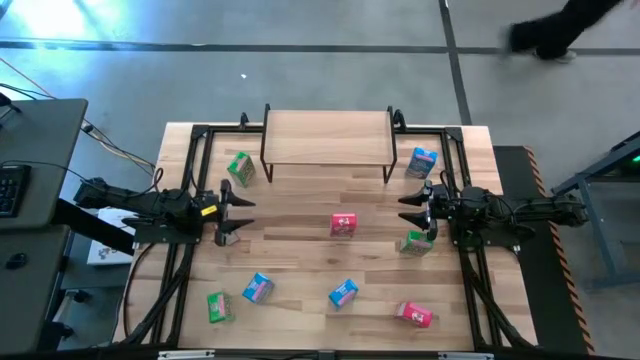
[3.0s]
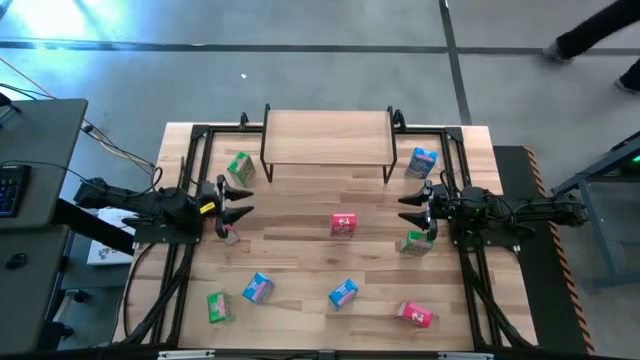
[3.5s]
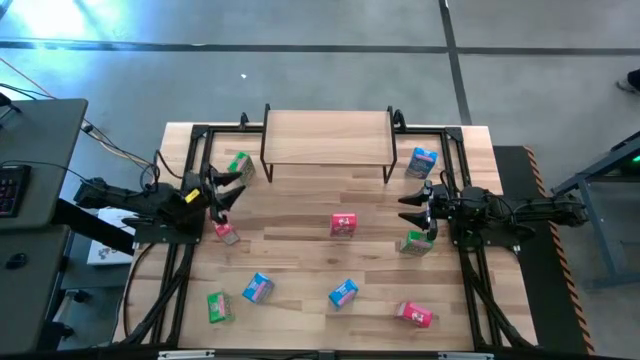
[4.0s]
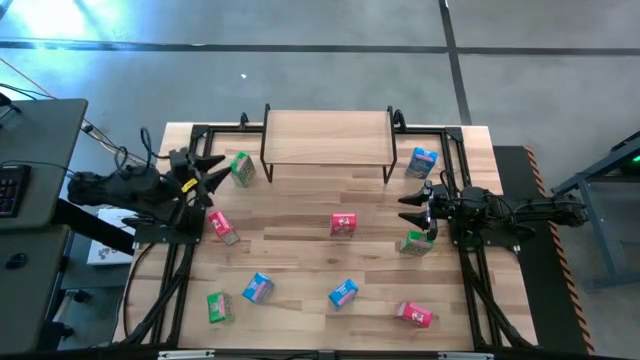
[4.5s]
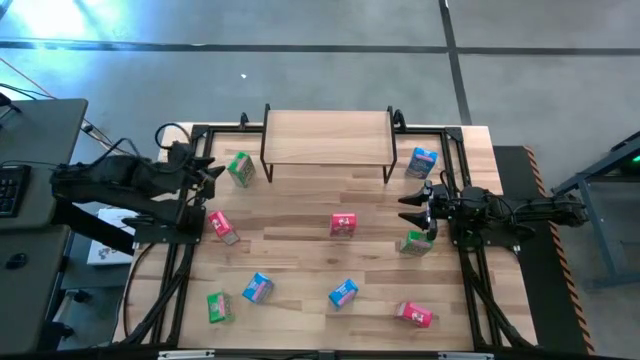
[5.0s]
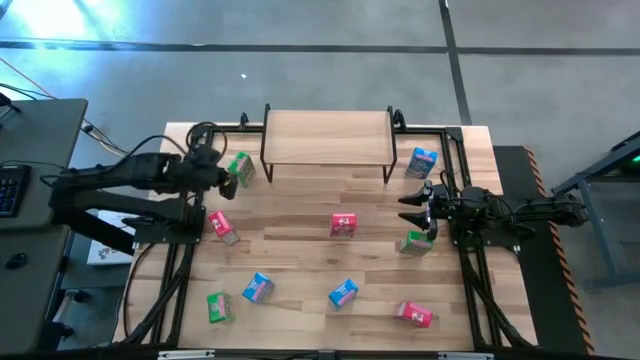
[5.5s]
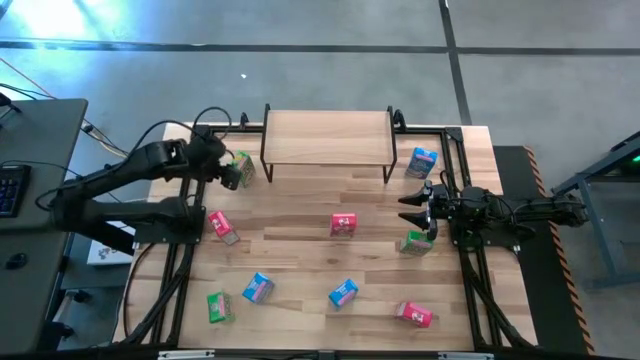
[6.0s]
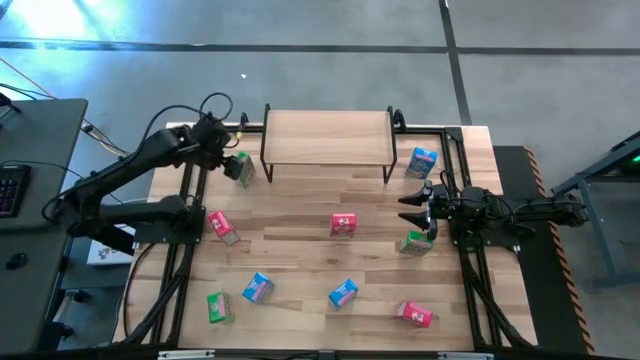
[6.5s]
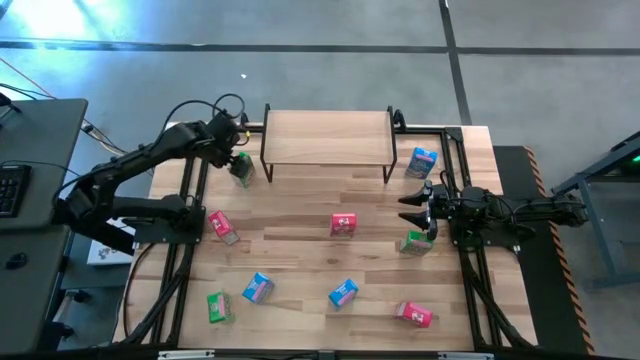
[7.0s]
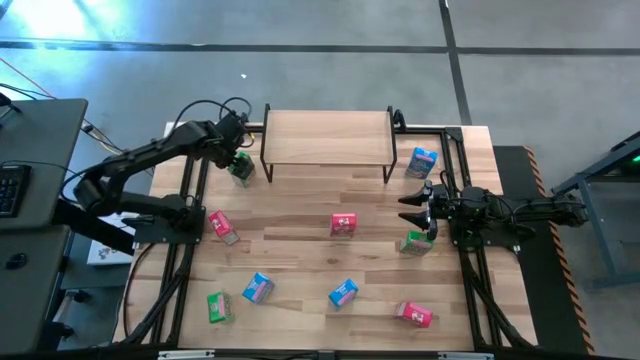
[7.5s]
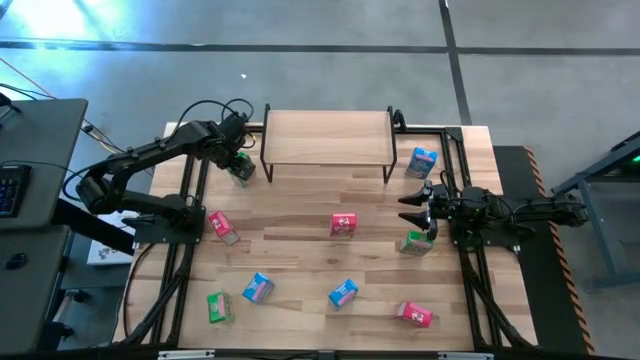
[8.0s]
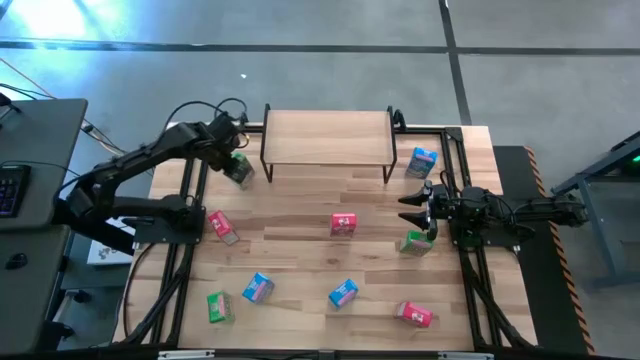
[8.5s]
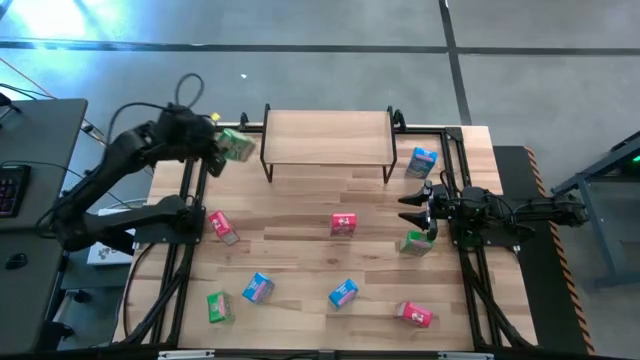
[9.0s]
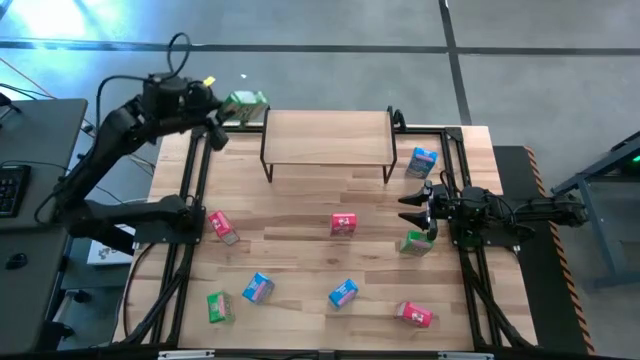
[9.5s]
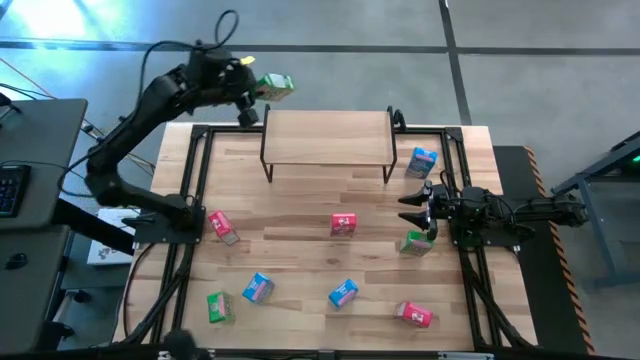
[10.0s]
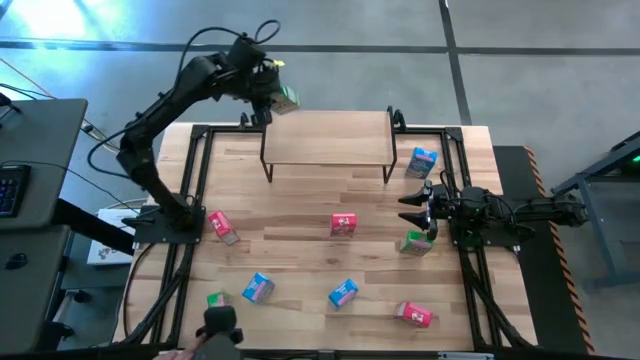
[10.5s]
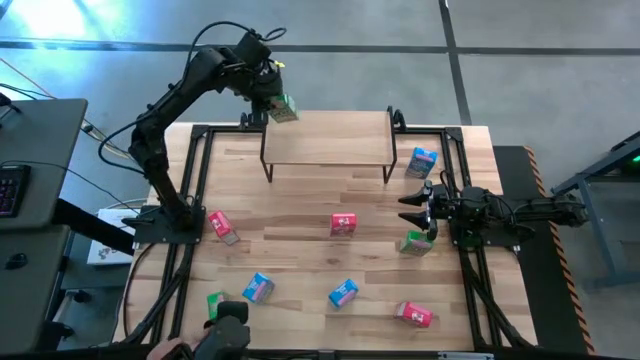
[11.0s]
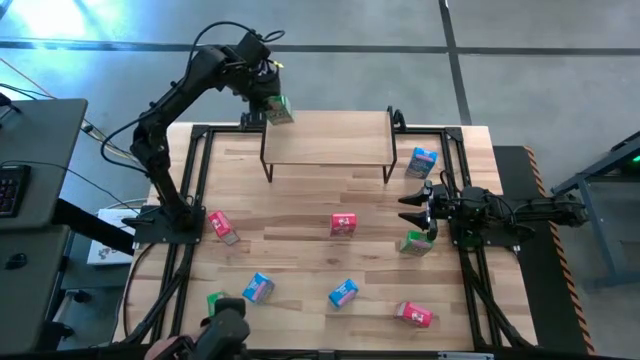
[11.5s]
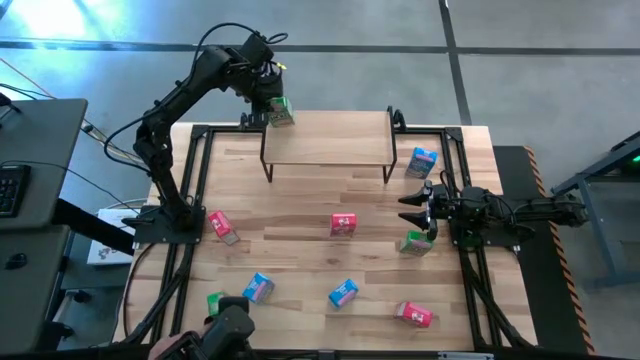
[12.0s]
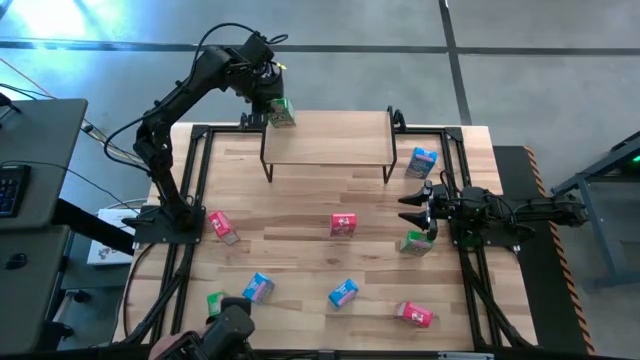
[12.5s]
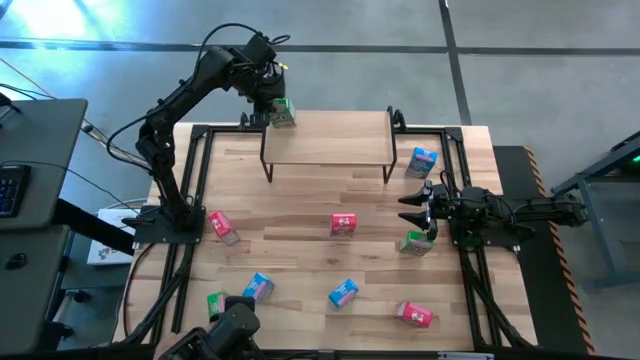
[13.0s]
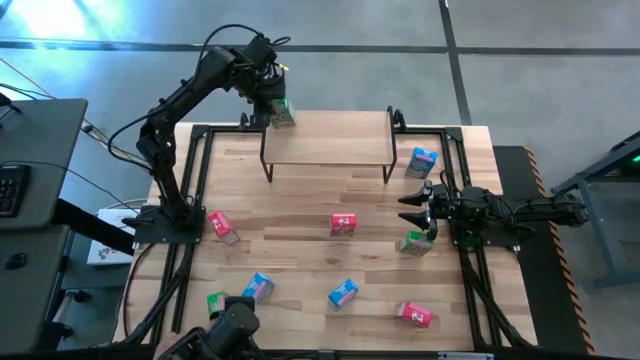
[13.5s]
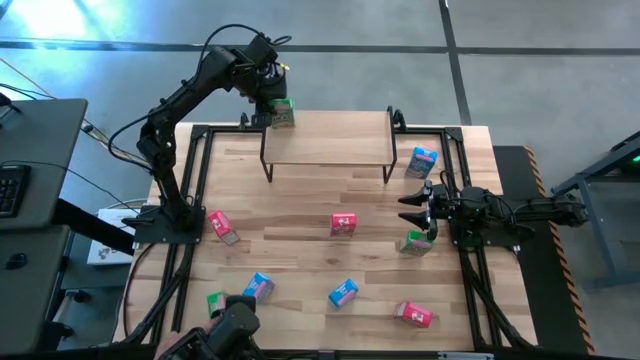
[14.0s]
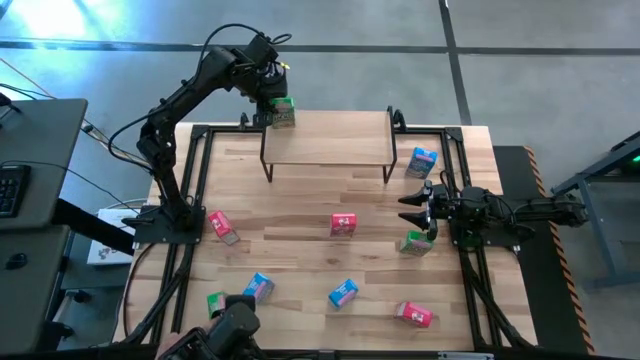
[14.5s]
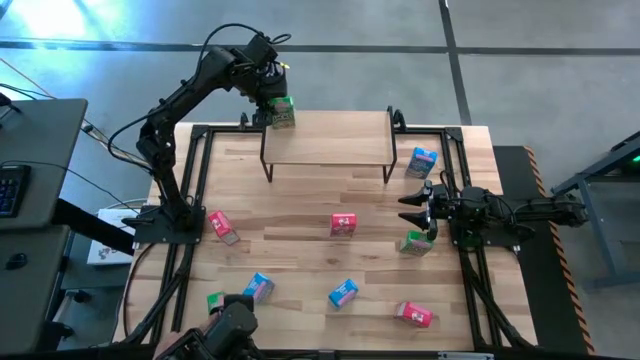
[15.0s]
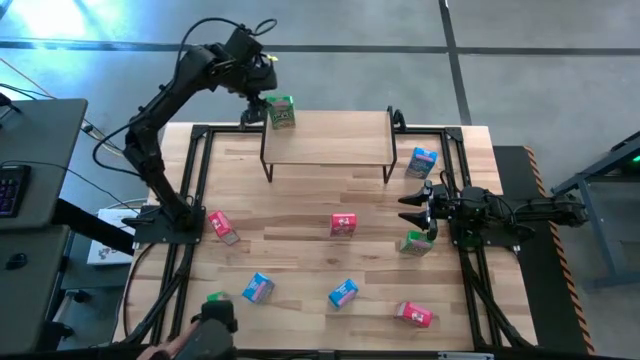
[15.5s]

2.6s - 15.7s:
Task: Stack cereal on shelf
Put the top green cereal box on the shelf

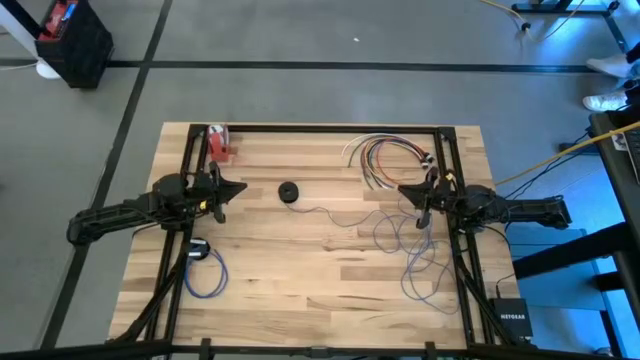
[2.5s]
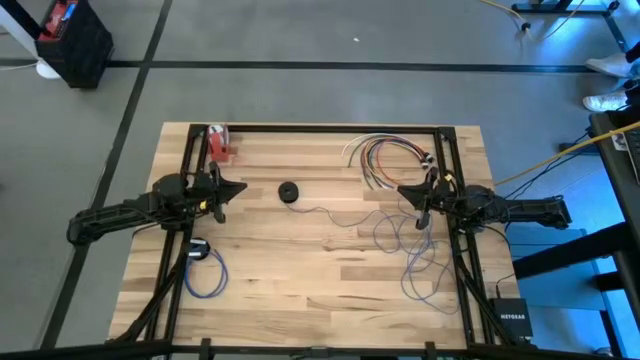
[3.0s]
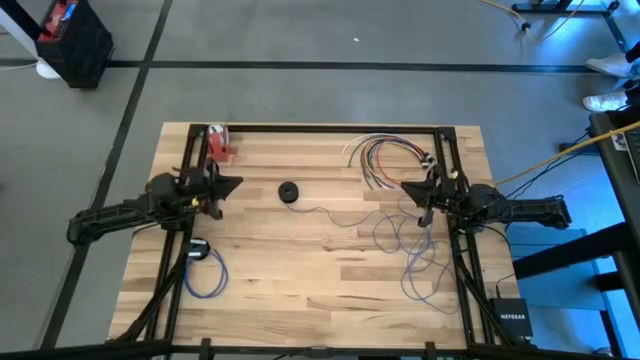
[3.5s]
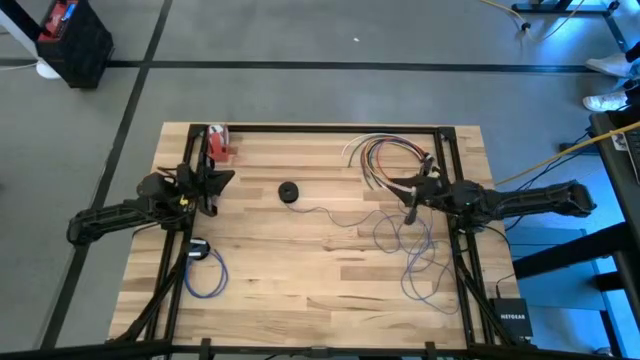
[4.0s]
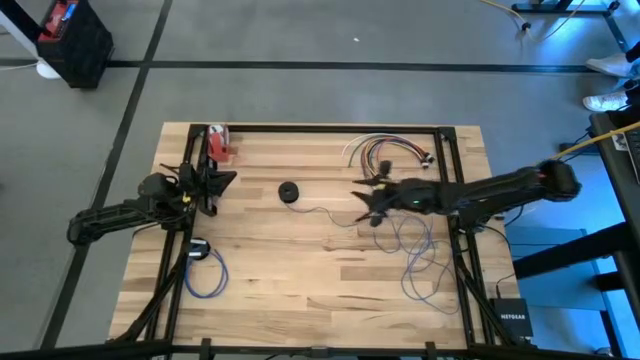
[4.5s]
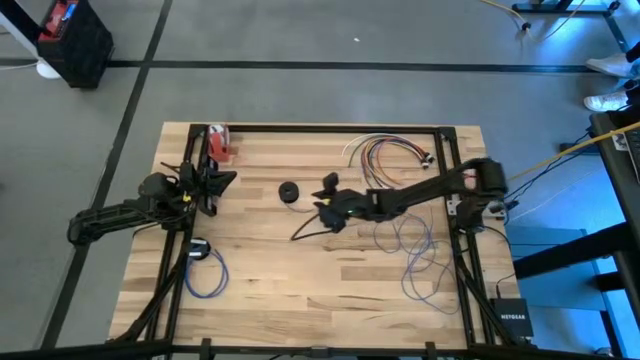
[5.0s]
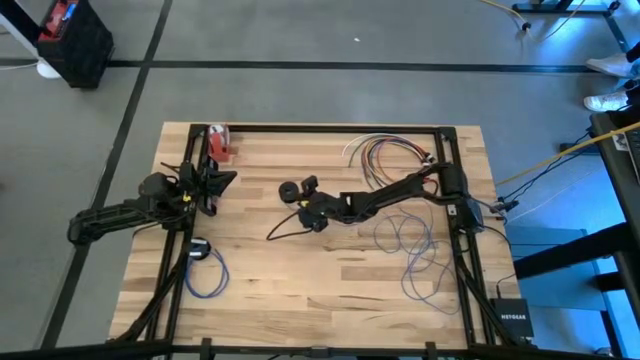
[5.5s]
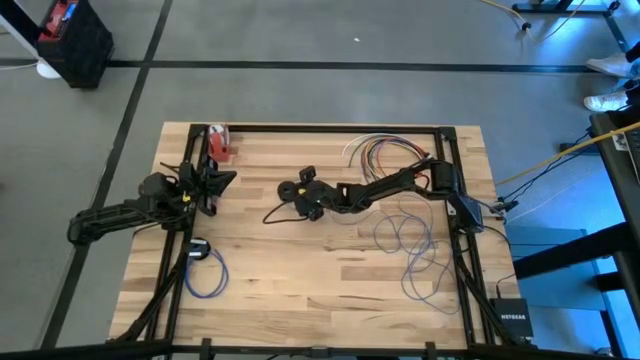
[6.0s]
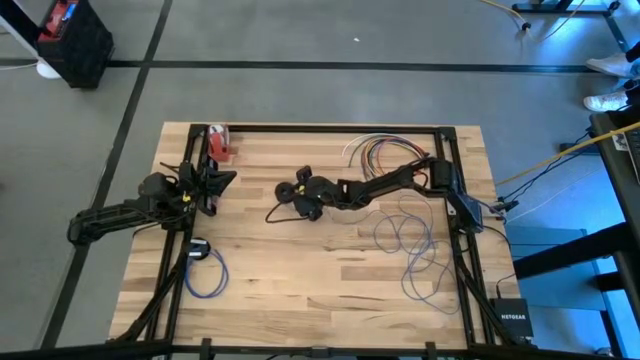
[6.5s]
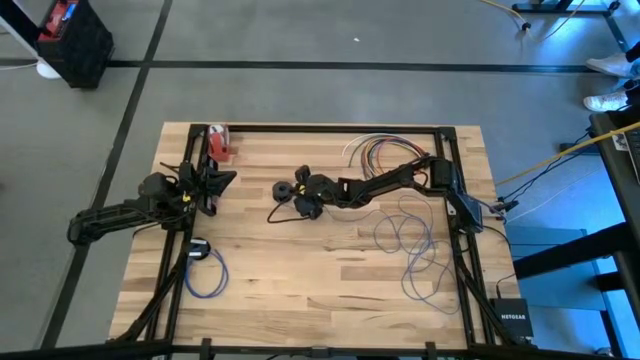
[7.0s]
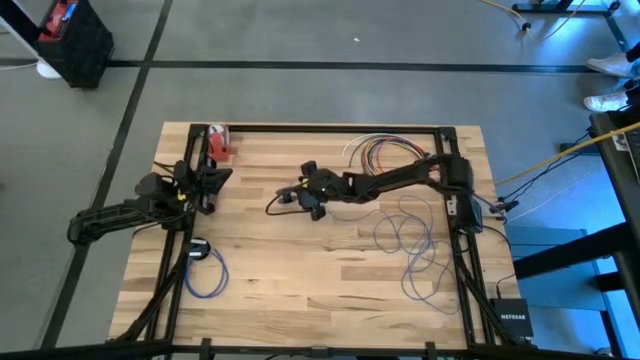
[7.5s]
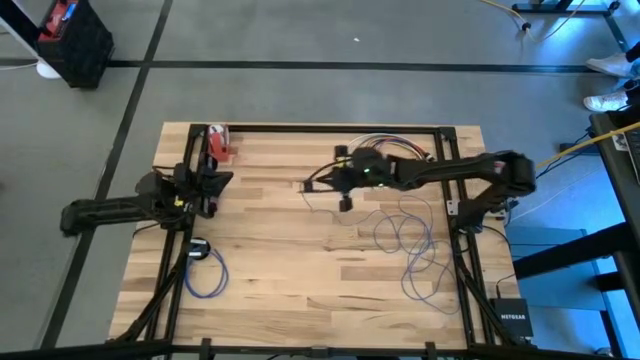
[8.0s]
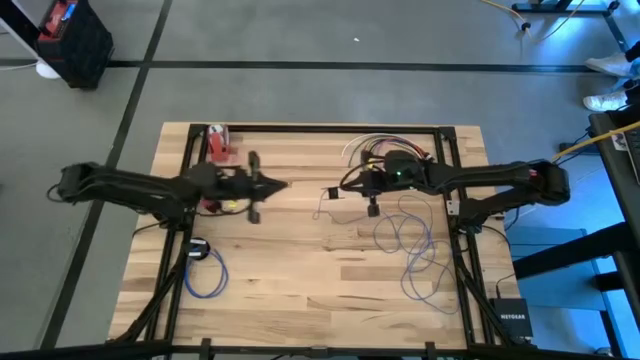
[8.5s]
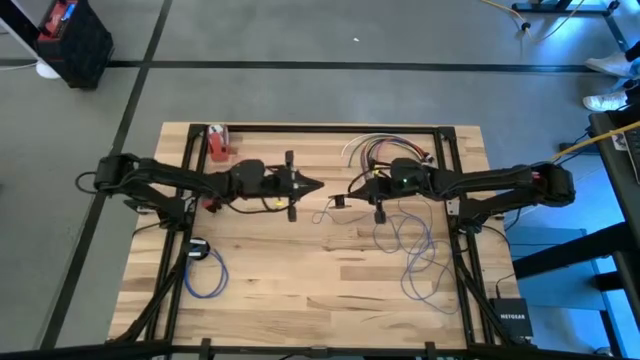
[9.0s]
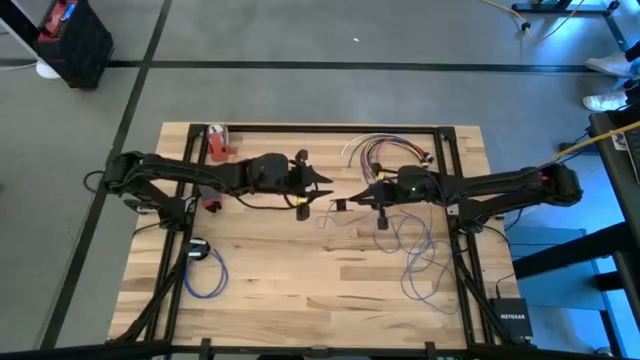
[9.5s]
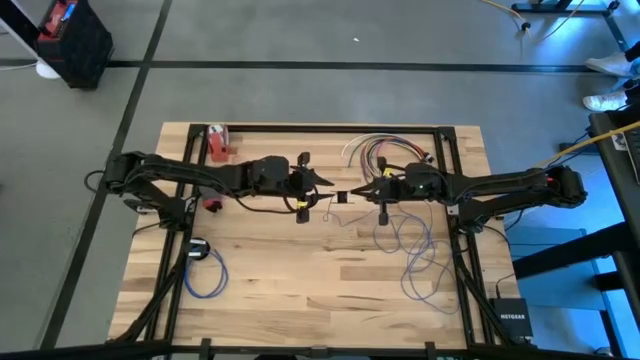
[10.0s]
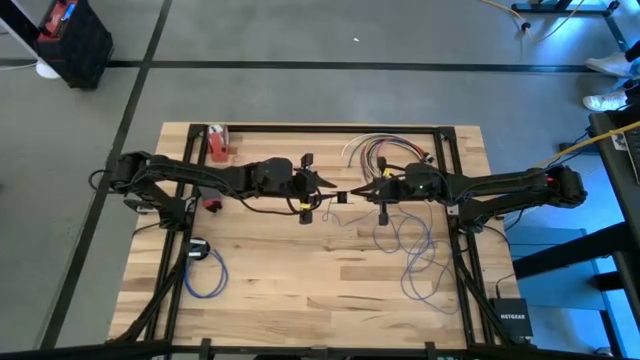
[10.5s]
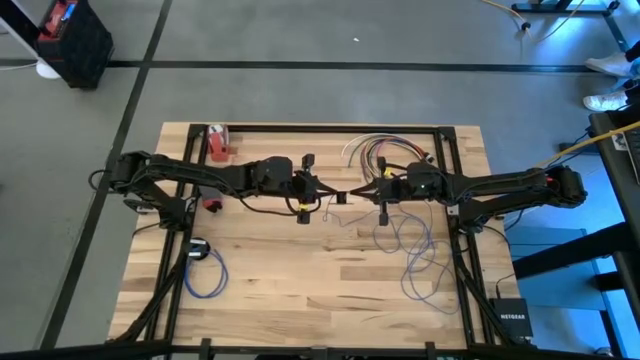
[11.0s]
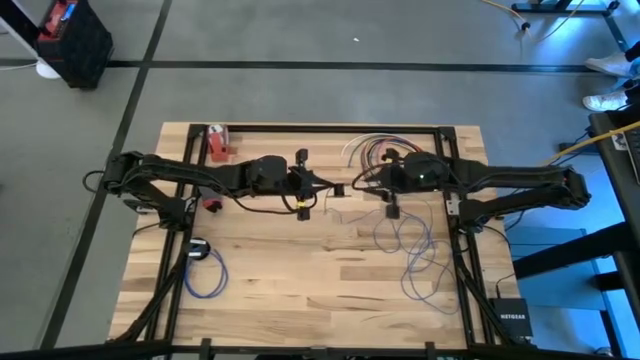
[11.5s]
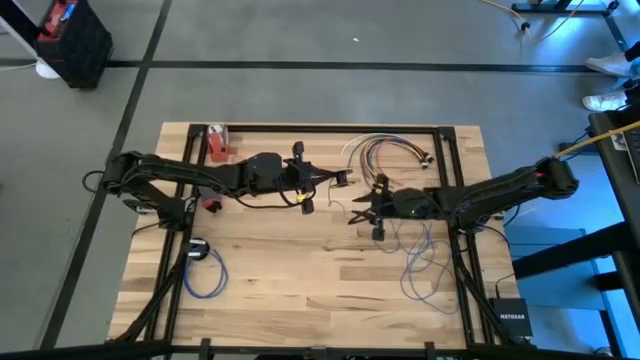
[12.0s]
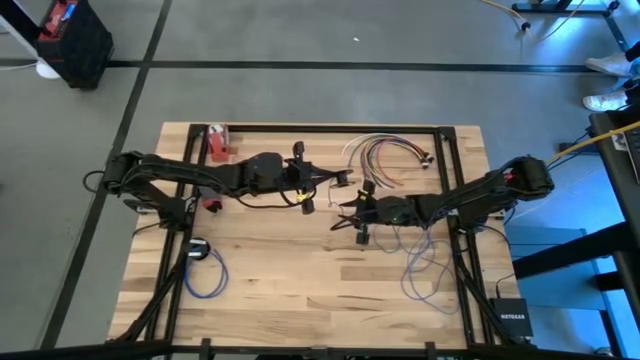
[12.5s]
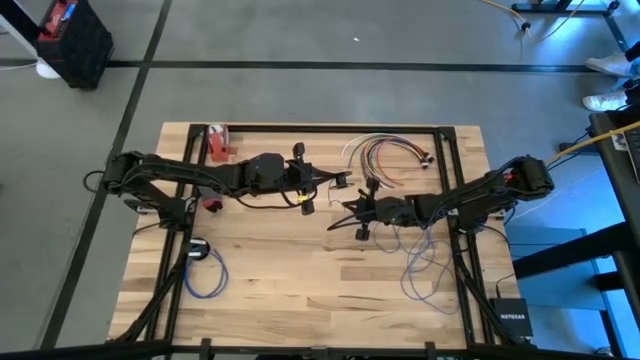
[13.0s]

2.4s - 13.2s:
Task: Coil cords
Coil the blue cable wire on the black spool
